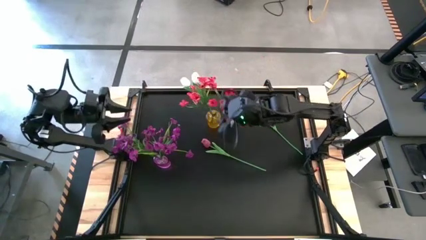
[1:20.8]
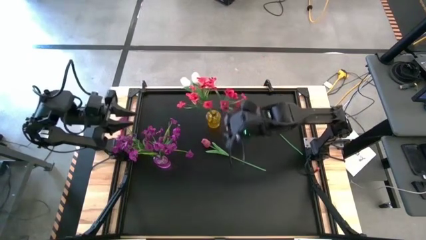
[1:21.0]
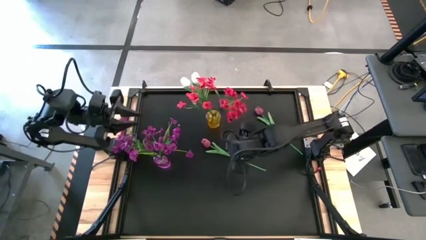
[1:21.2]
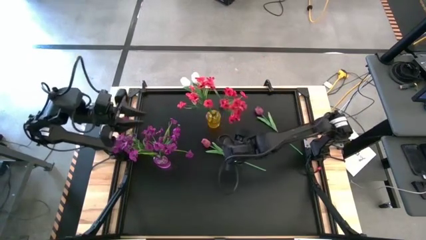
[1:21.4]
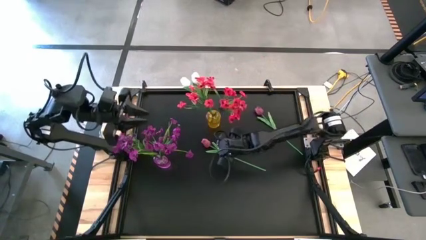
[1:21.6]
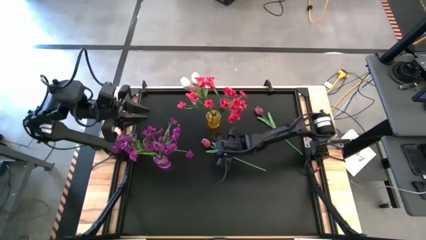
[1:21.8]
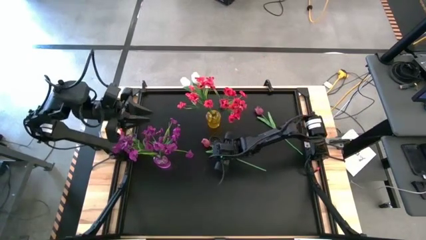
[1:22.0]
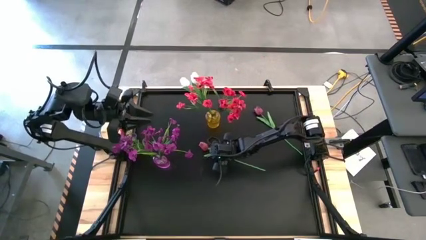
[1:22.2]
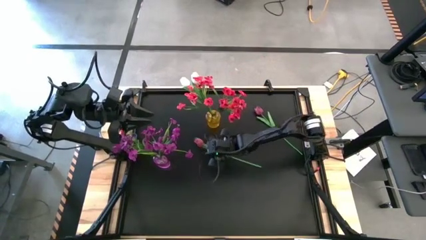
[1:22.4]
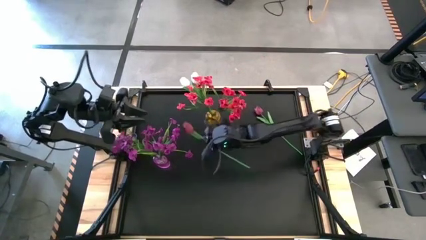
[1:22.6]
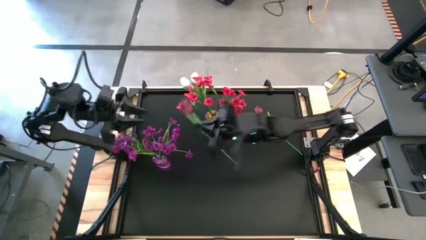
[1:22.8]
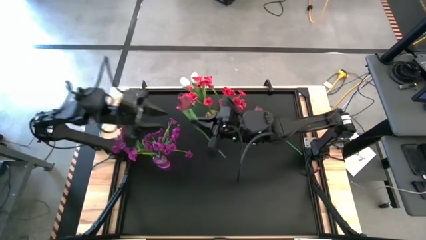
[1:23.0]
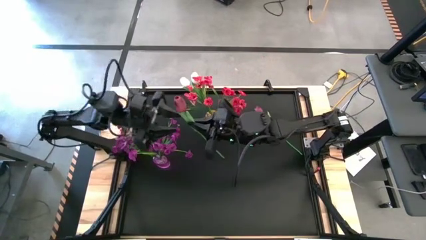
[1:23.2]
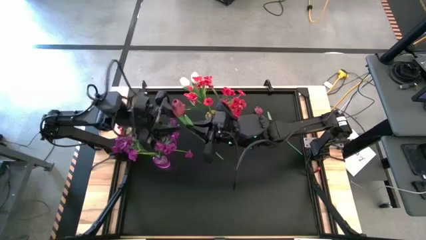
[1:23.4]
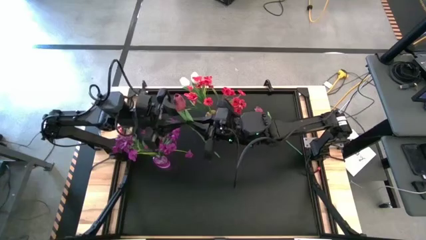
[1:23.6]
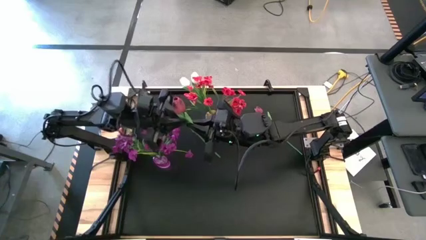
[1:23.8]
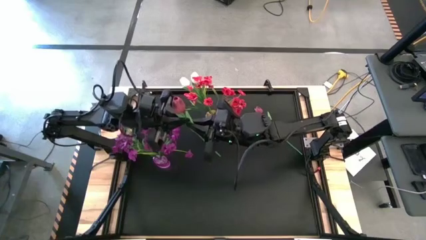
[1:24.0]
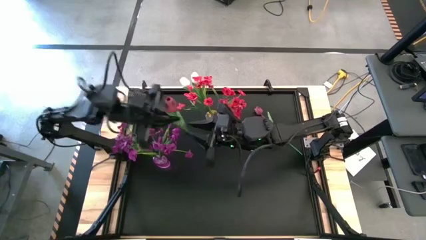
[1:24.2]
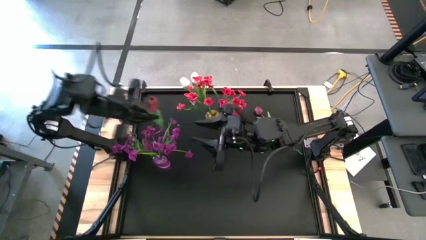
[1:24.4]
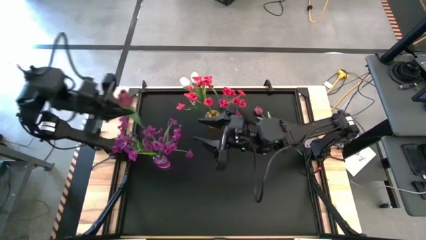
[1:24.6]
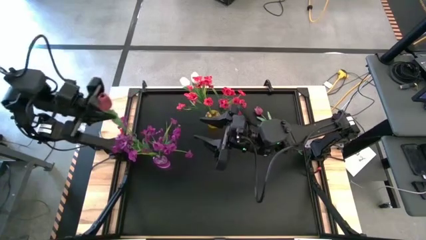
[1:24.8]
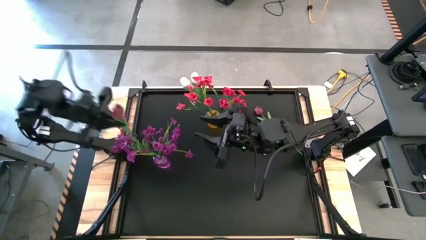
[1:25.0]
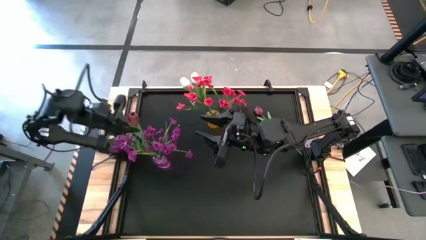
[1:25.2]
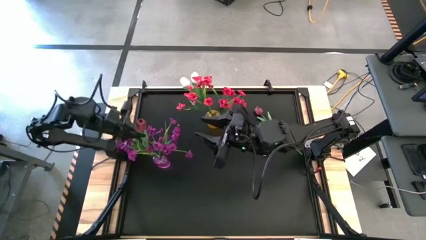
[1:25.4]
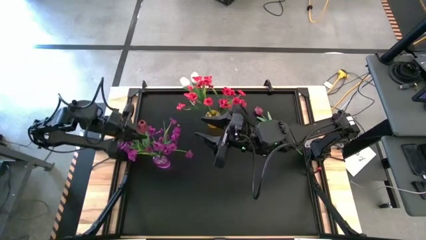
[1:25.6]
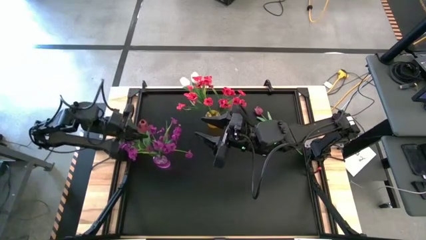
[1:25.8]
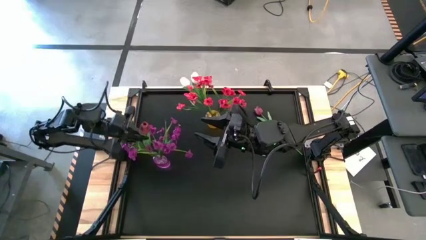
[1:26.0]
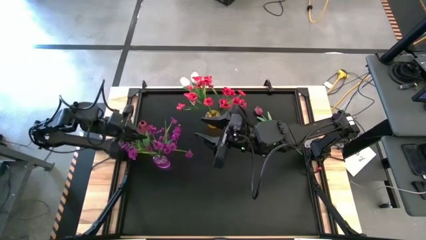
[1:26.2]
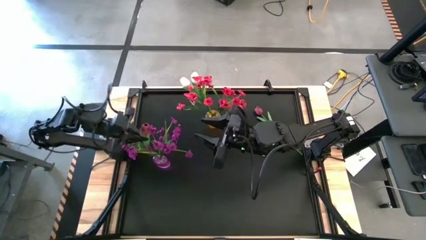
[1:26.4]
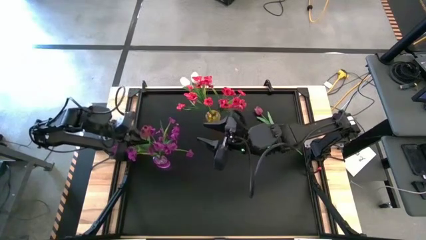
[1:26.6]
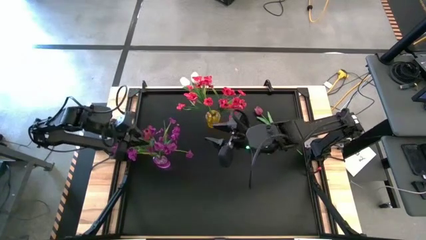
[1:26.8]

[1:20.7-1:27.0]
Task: Sort flowers into vase by color
Put the bottom dark red flower into the purple vase

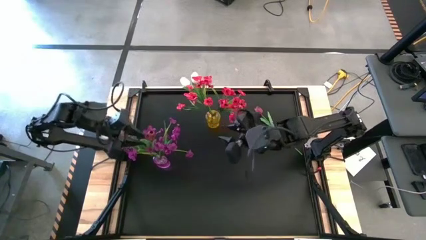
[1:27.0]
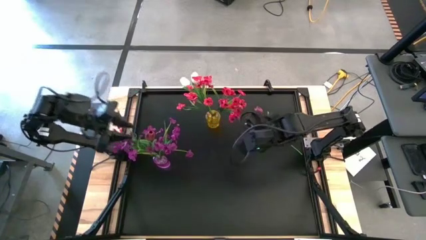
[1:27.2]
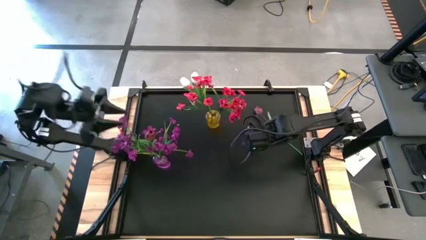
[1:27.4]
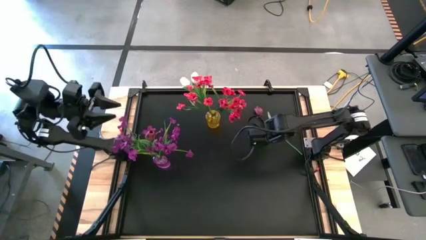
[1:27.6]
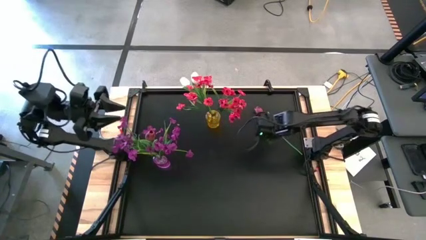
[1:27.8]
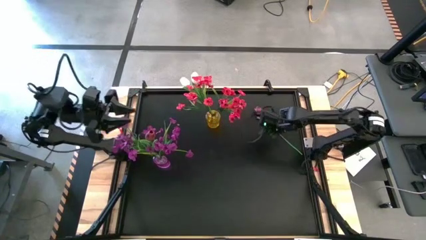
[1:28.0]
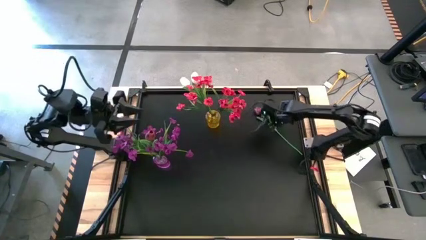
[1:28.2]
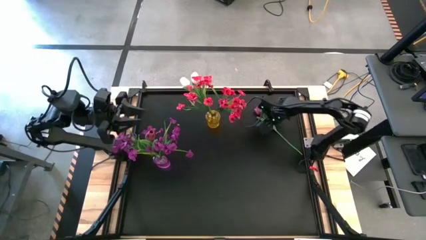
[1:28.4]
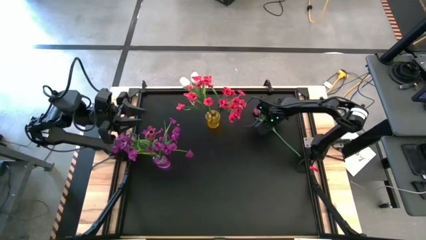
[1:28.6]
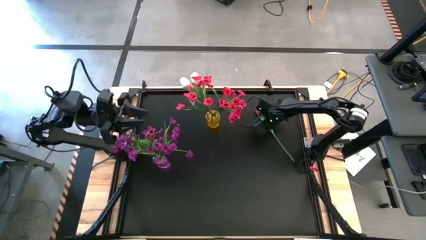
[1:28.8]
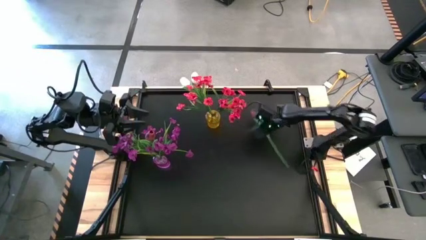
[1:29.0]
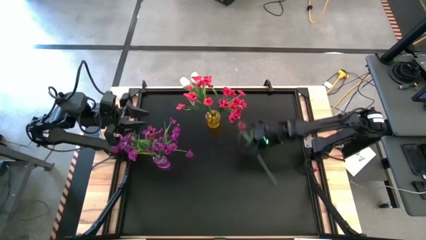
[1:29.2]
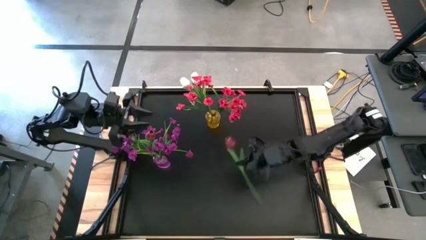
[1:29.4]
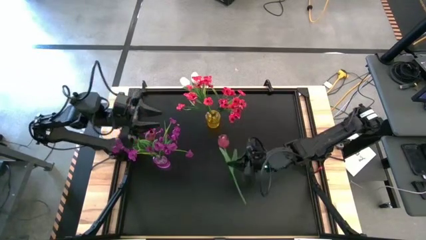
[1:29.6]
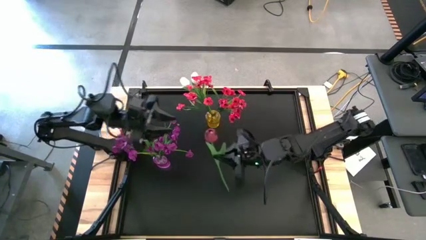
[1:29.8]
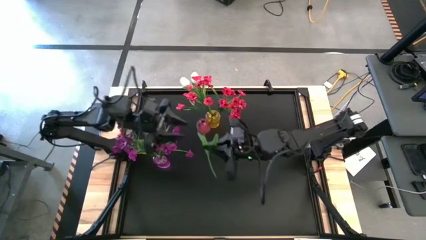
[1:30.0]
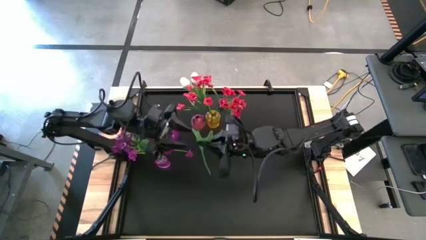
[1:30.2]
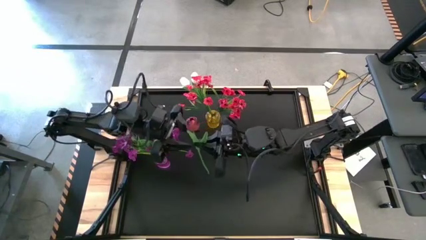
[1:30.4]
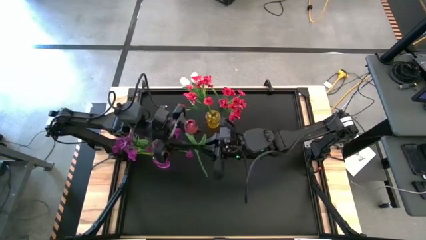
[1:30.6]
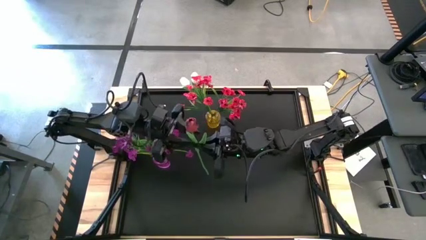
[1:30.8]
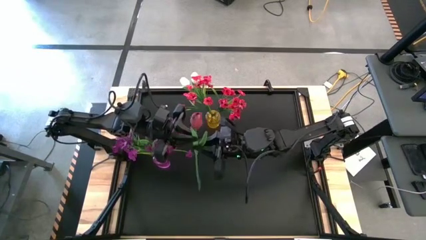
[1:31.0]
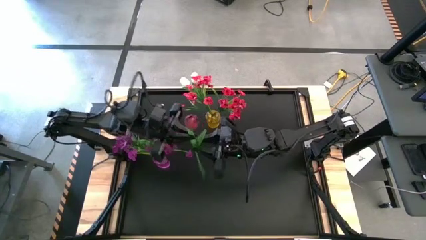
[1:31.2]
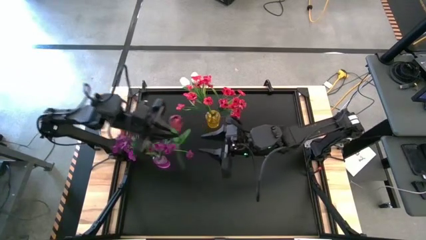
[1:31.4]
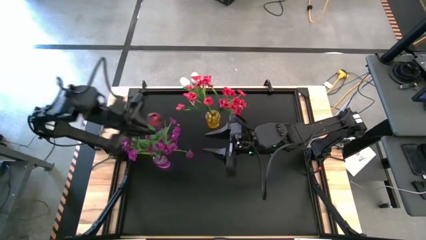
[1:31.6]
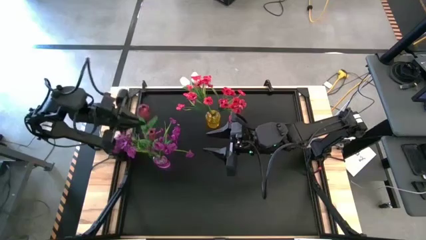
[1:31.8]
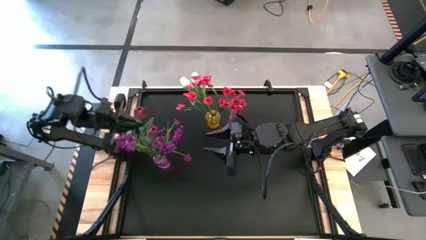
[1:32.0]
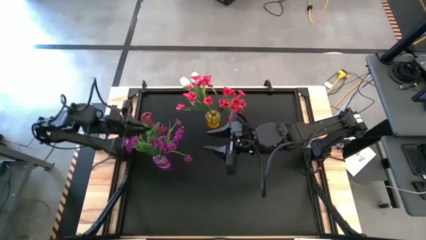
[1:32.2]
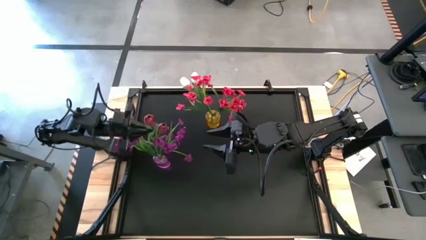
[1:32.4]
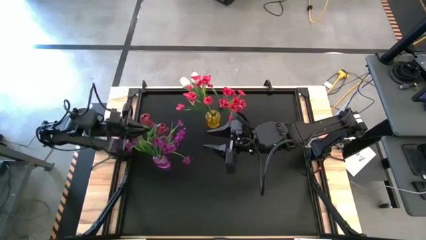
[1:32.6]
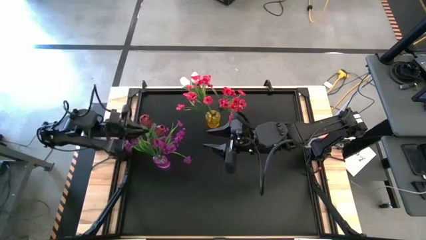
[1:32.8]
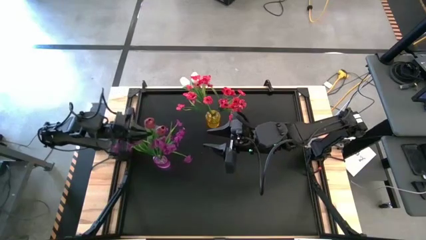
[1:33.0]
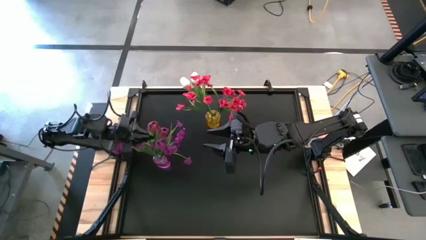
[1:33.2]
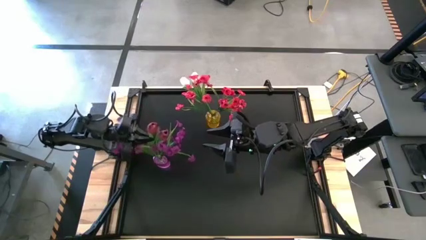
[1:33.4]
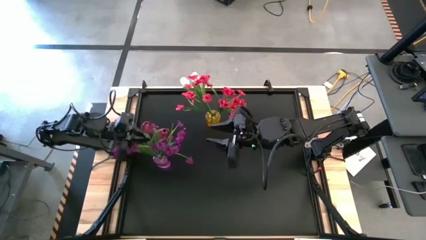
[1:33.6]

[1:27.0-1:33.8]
Put the dark red flower into the purple vase
